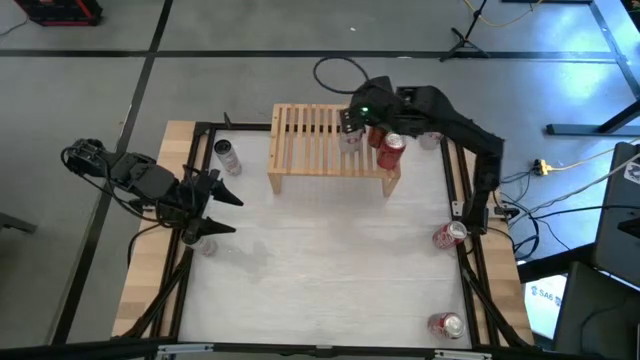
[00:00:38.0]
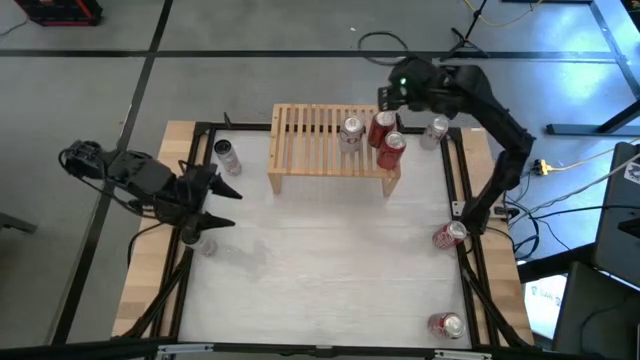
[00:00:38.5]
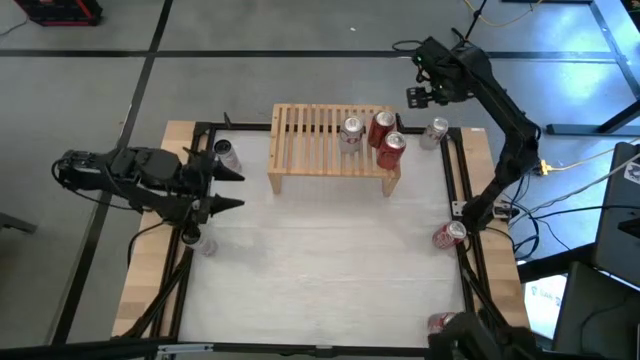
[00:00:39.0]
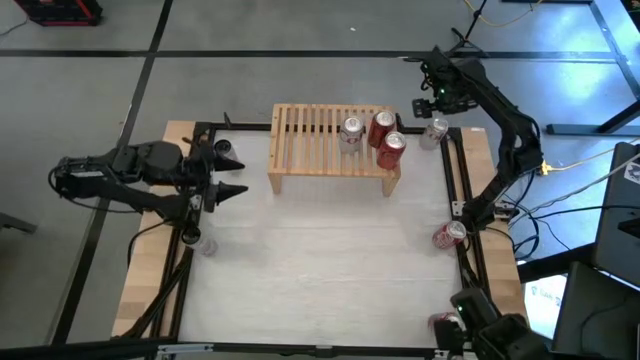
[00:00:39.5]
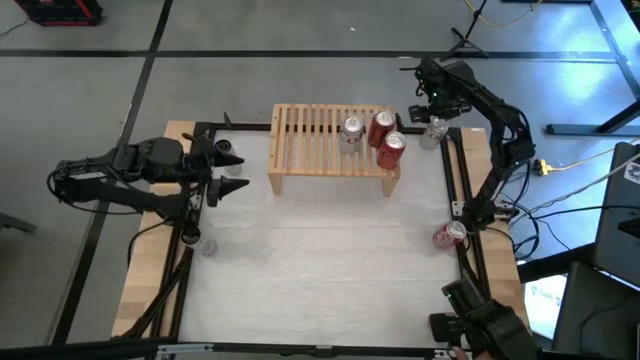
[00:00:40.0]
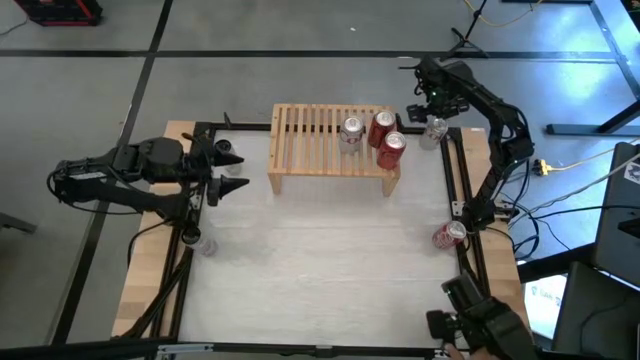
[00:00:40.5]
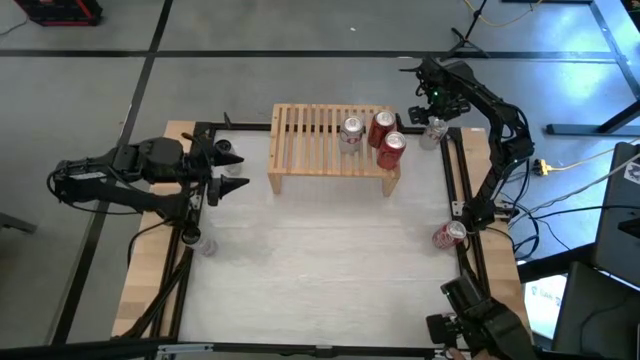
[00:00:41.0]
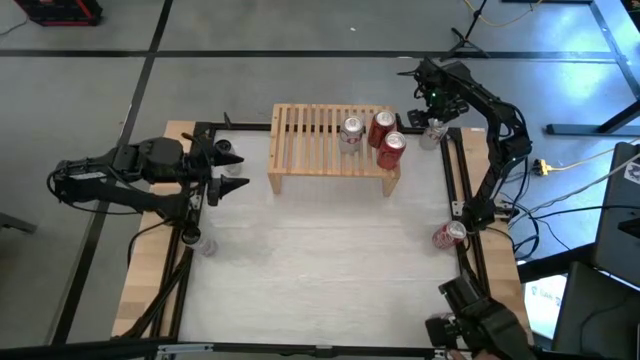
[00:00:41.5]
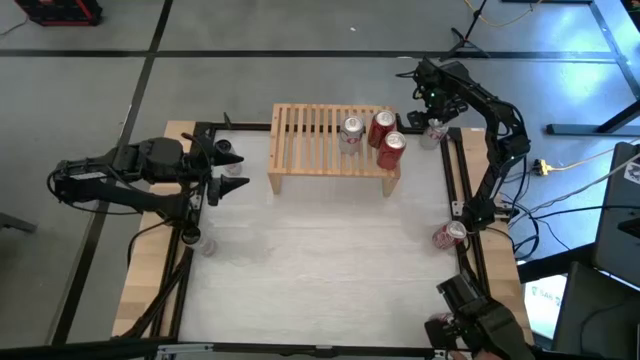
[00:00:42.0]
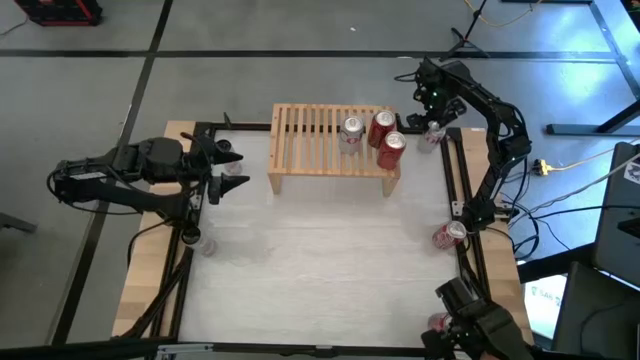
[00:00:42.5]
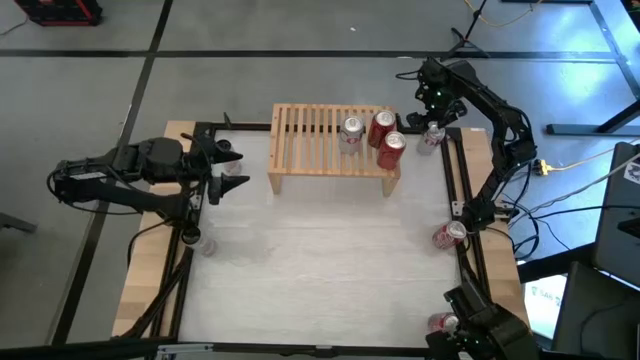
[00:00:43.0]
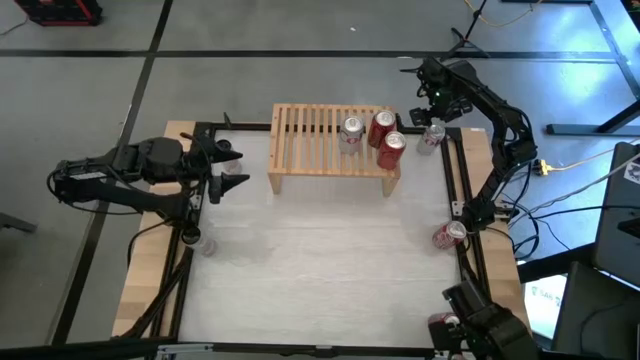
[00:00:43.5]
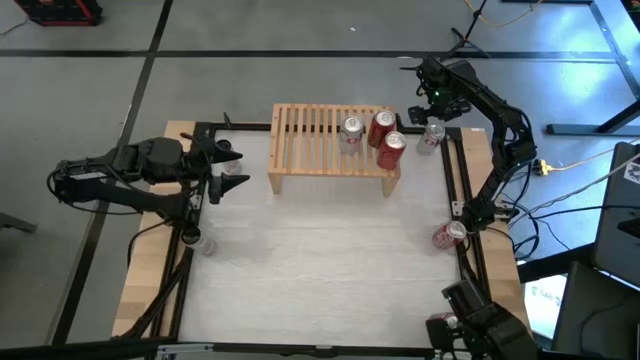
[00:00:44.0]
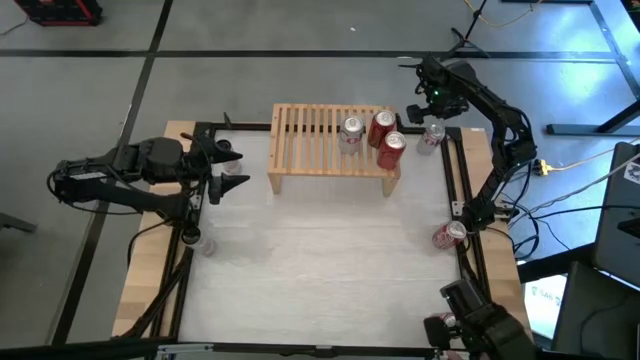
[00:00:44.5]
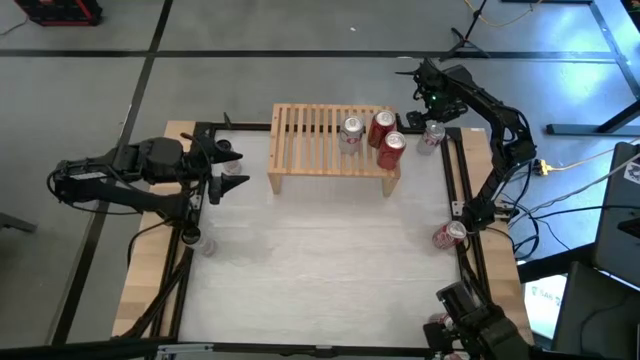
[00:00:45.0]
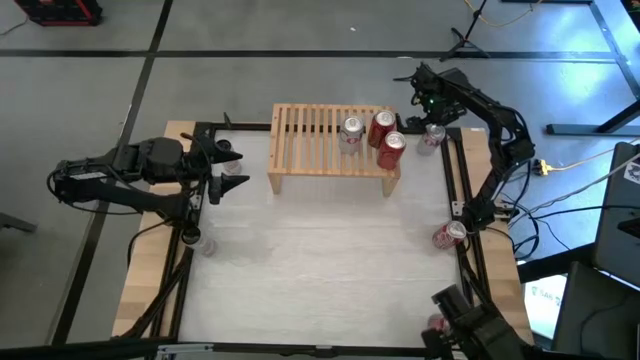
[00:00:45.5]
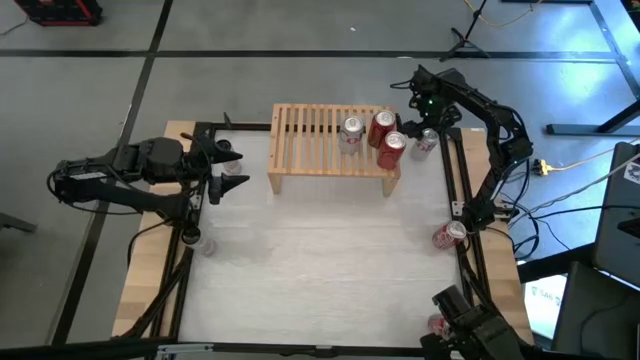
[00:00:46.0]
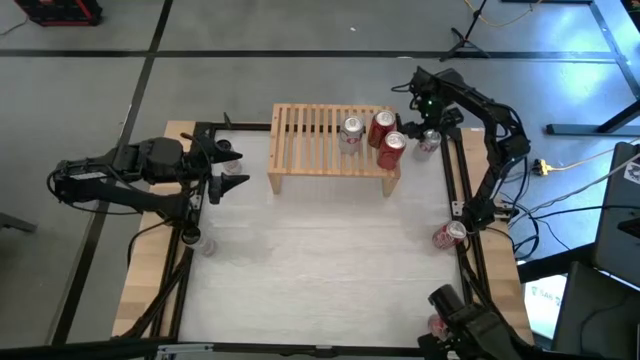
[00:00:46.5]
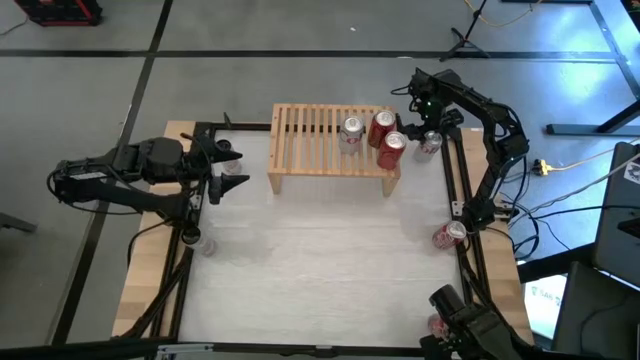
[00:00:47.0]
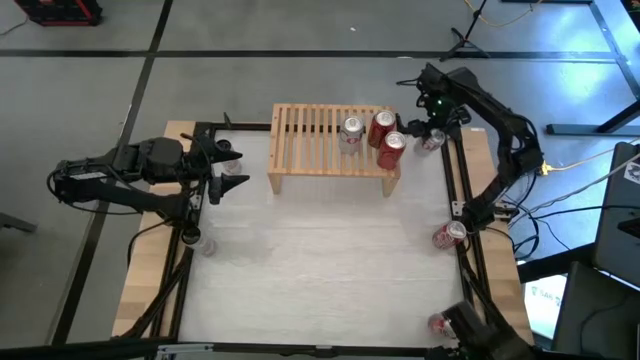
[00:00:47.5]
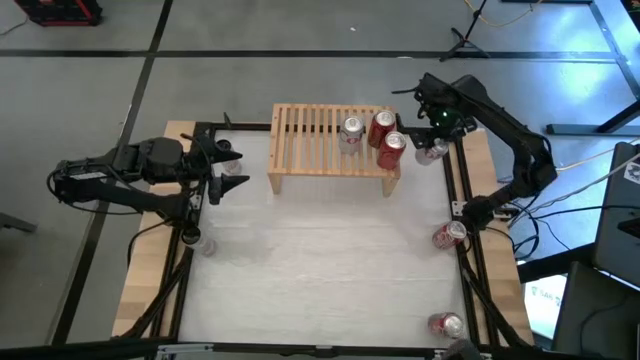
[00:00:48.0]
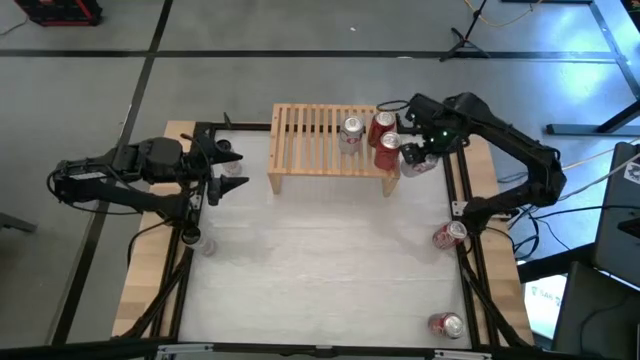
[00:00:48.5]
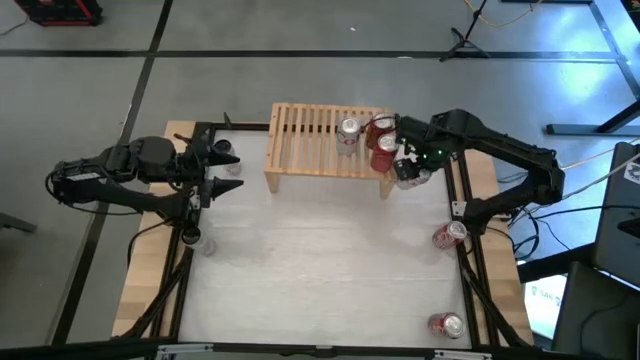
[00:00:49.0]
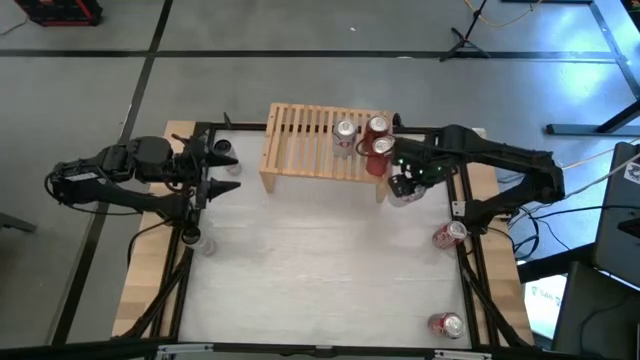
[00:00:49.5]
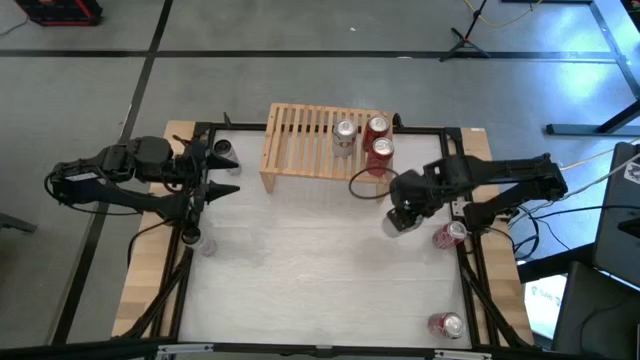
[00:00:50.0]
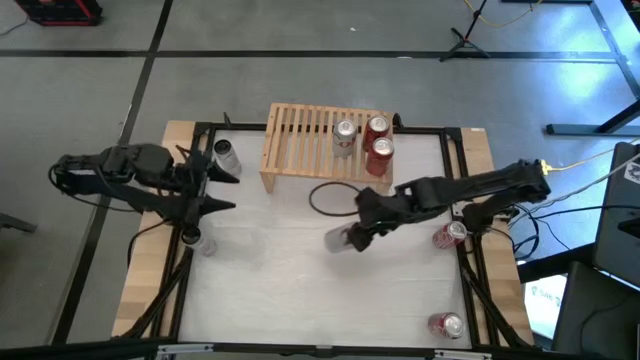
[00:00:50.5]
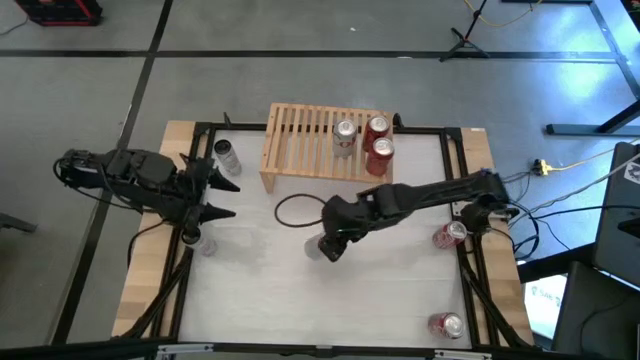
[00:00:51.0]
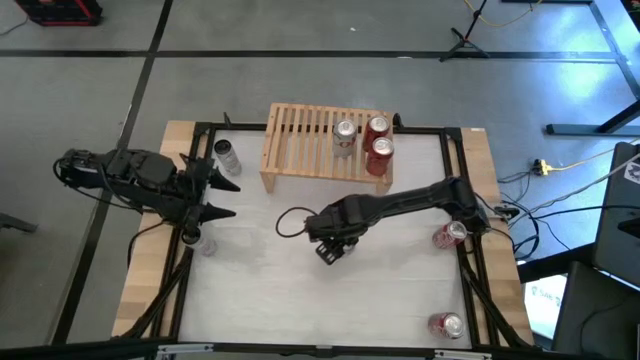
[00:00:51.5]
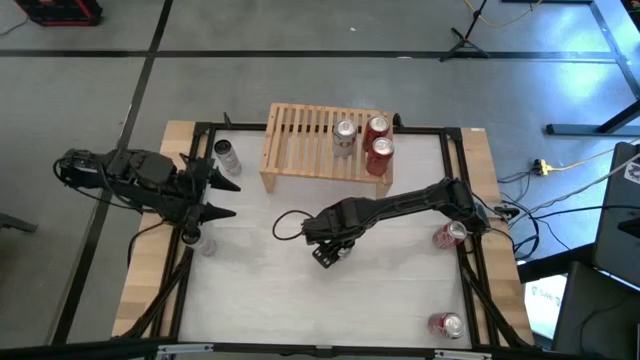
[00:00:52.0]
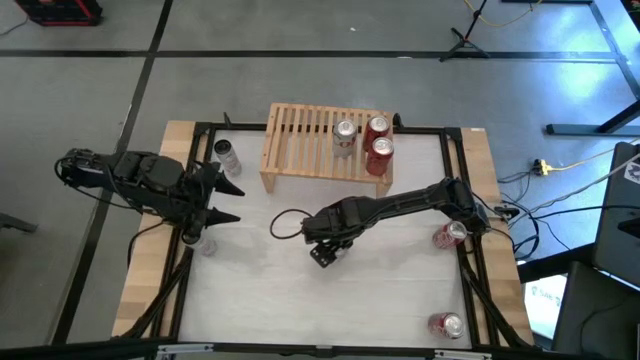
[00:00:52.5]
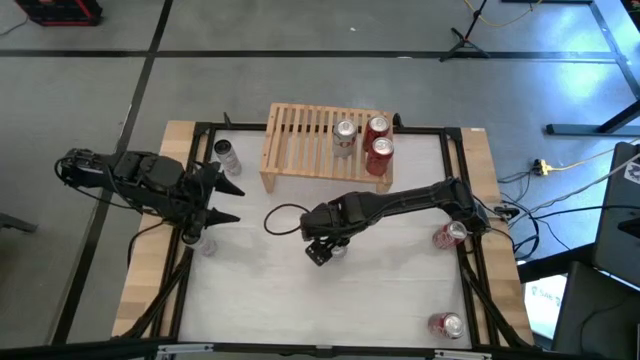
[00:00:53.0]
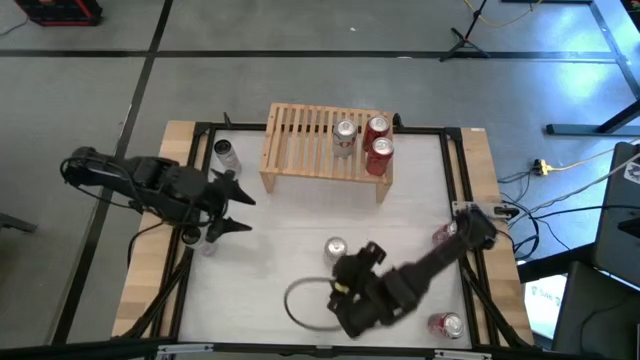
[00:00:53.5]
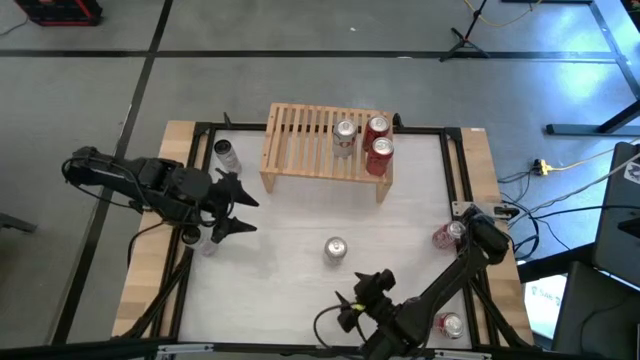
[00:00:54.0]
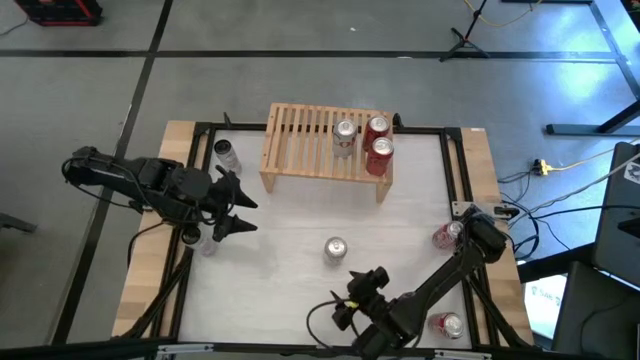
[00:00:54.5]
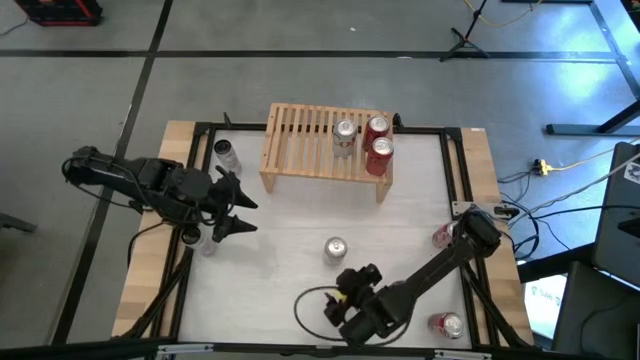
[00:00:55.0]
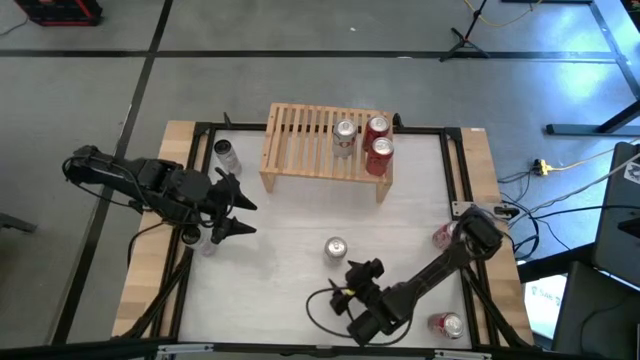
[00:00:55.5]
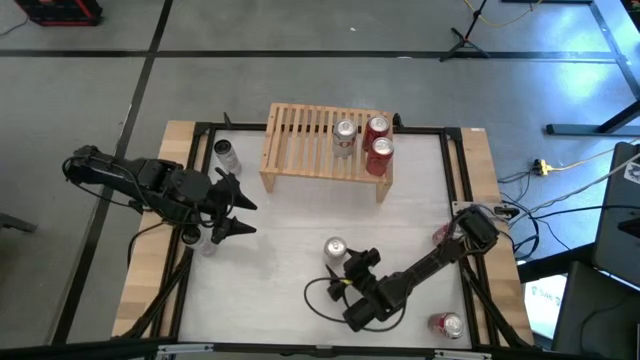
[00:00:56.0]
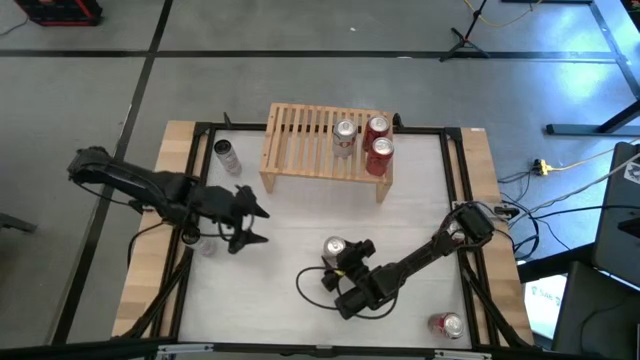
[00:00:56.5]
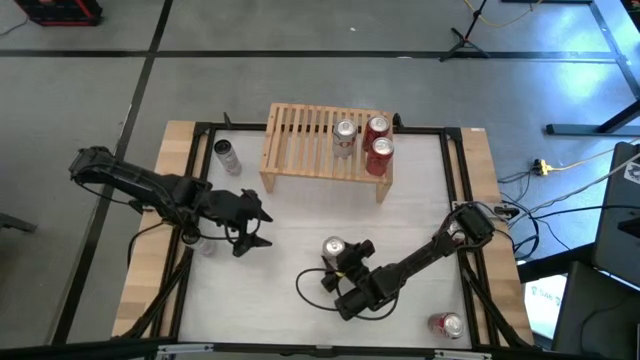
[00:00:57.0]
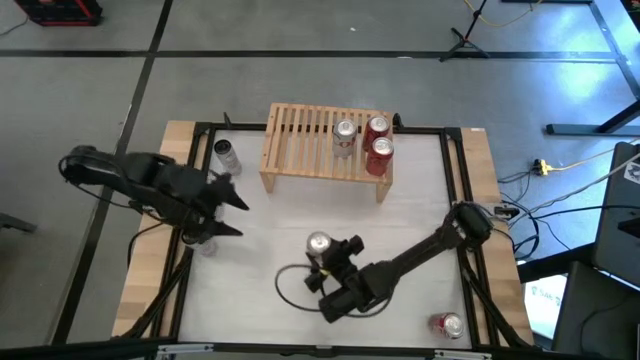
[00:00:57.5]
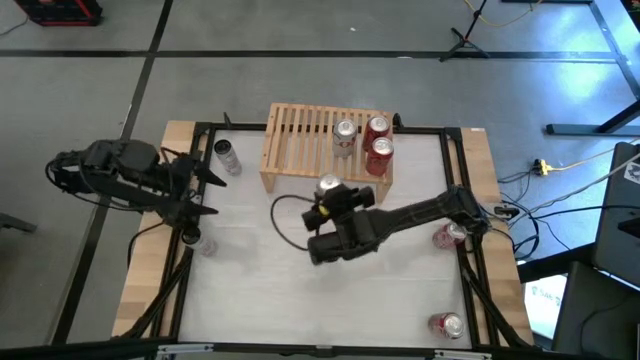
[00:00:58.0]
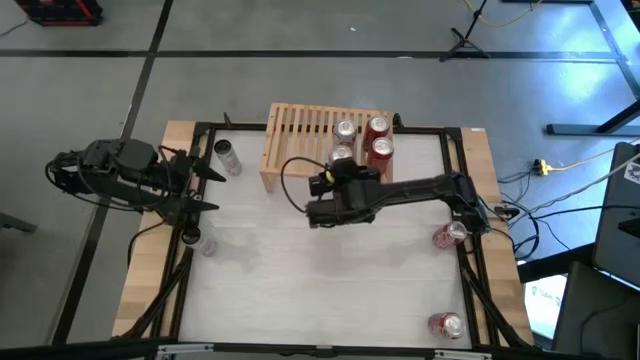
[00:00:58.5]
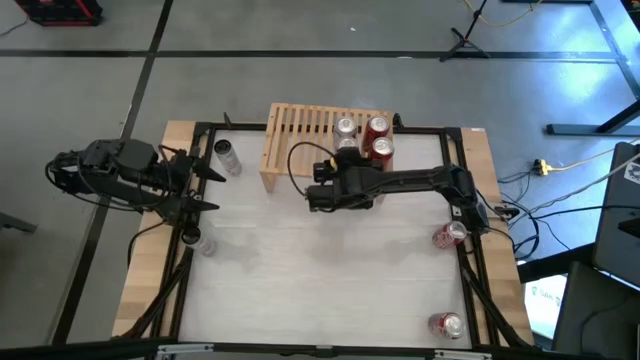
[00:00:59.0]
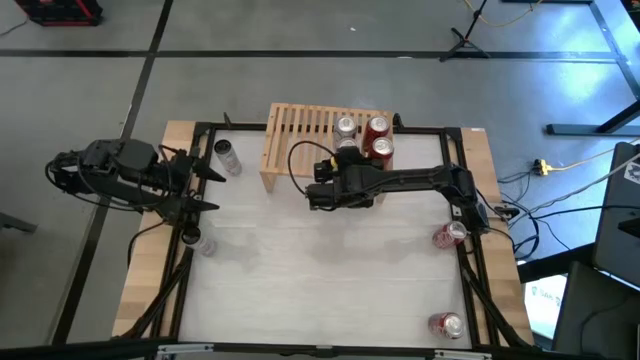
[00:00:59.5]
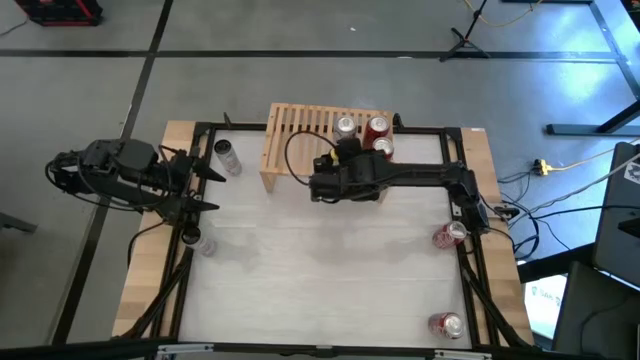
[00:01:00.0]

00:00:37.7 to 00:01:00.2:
Task: Place canned beverage on shelf
Put the silver soda can on the shelf aligned with the other silver soda can
